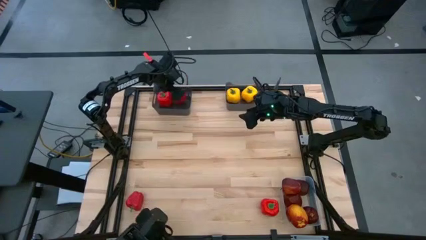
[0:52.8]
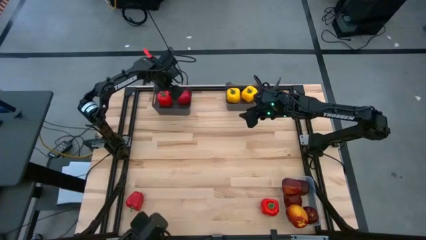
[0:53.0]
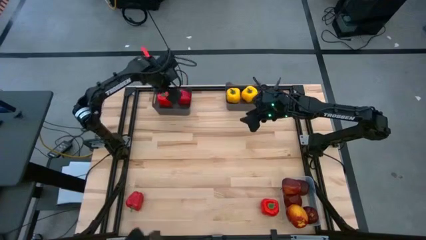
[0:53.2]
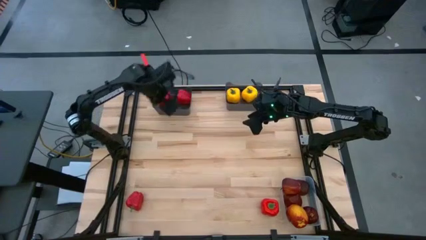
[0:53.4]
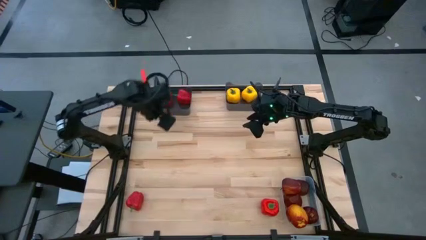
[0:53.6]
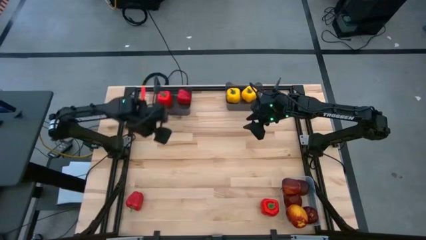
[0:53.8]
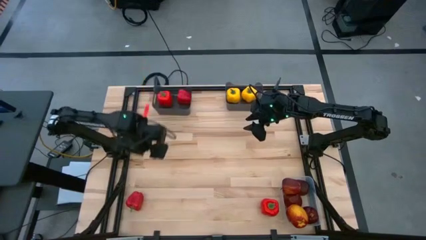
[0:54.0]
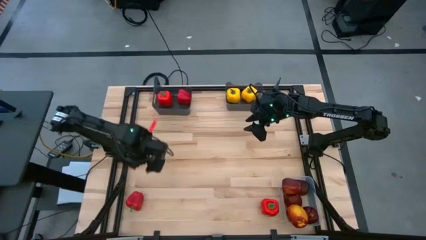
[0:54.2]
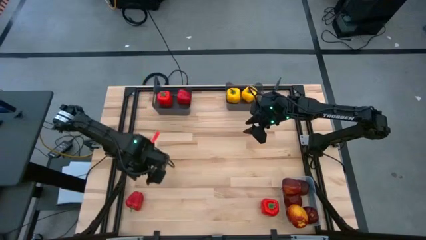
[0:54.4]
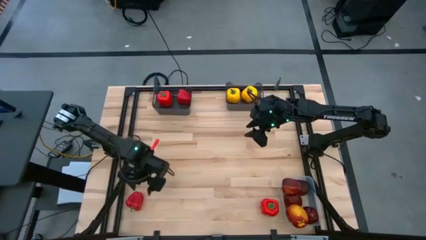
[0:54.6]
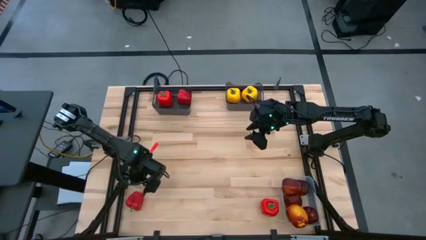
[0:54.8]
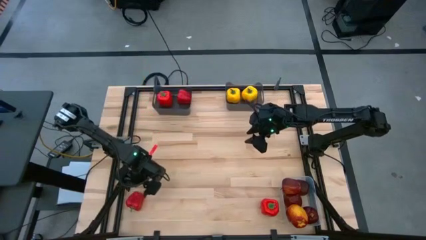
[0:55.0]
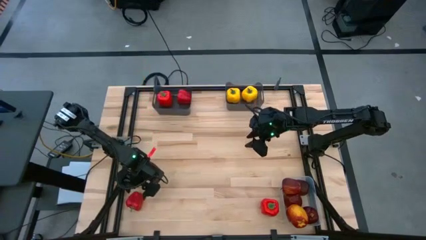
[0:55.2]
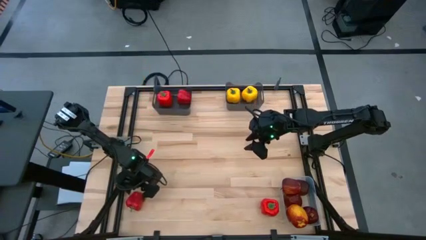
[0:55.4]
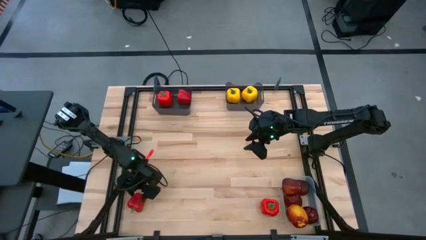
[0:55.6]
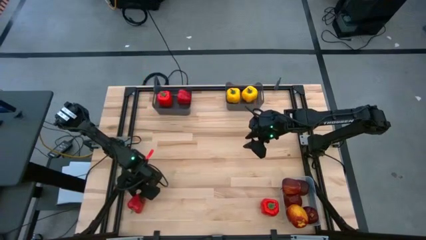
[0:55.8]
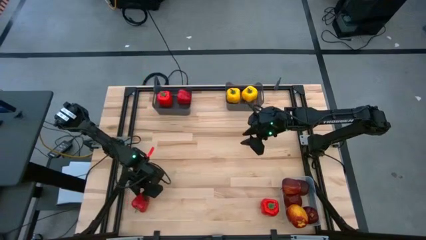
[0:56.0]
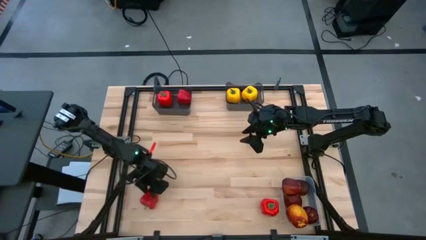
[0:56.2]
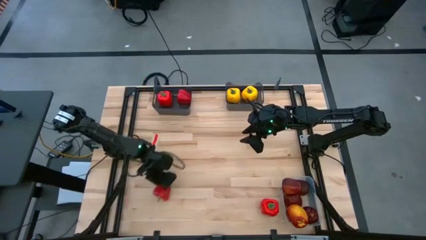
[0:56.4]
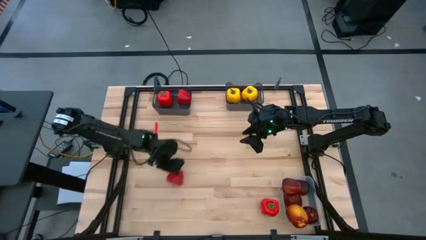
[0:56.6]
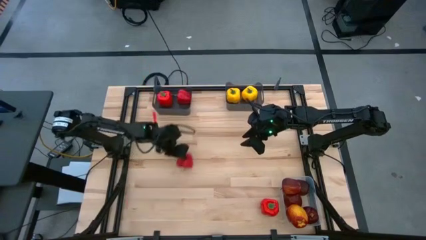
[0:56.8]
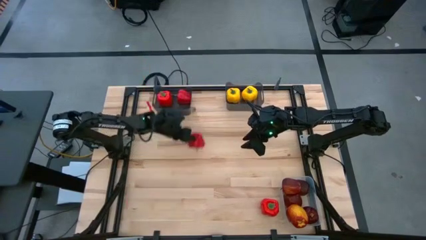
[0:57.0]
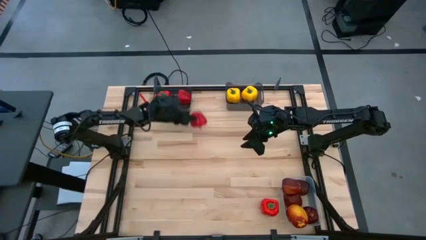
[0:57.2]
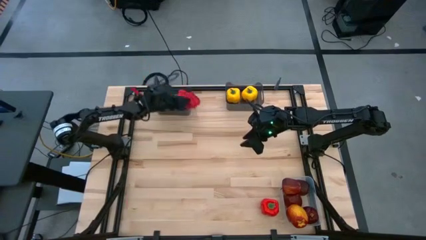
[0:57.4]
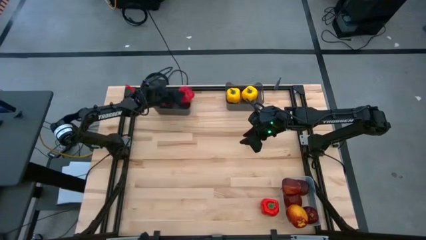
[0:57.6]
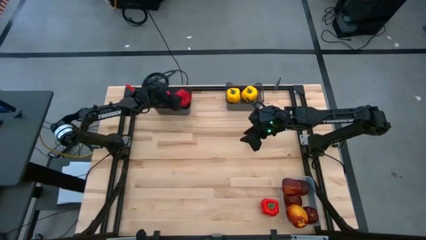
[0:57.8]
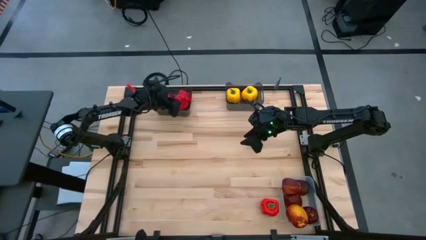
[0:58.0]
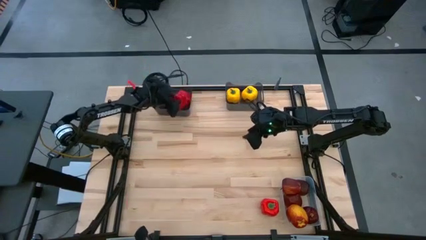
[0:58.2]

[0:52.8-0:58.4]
Task: Sort produce into baskets
Put the red bell pepper into the left black bin

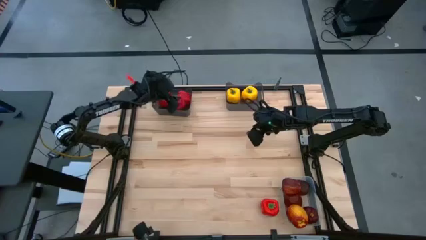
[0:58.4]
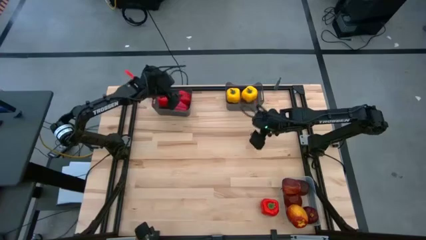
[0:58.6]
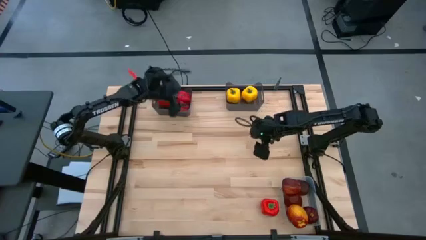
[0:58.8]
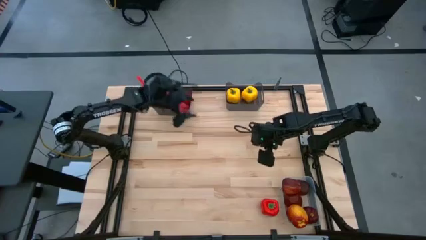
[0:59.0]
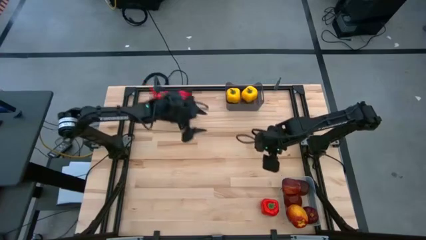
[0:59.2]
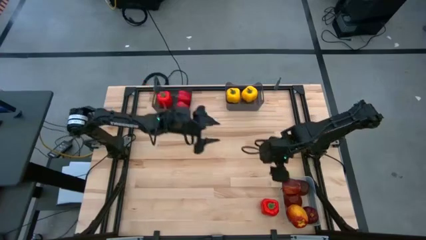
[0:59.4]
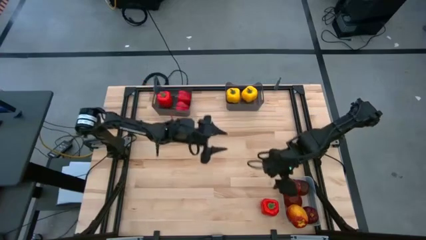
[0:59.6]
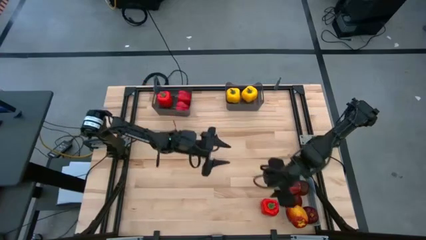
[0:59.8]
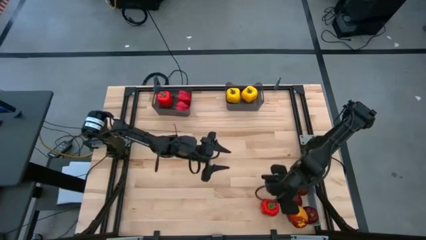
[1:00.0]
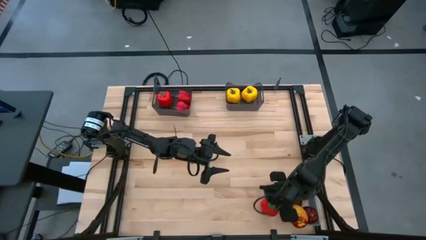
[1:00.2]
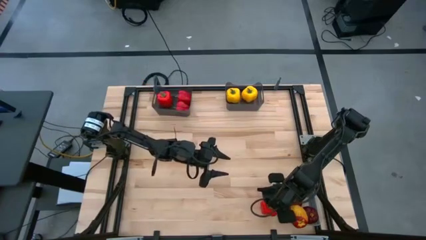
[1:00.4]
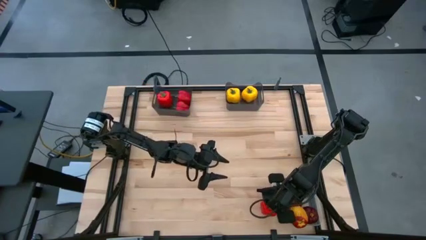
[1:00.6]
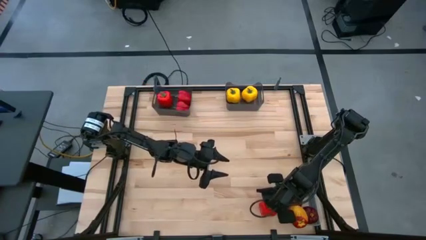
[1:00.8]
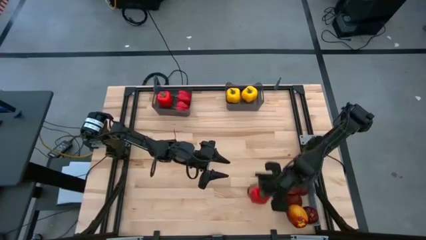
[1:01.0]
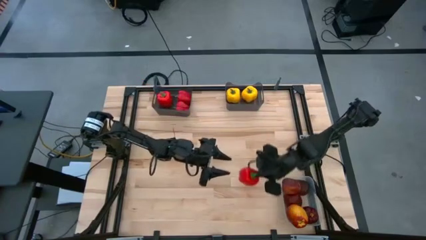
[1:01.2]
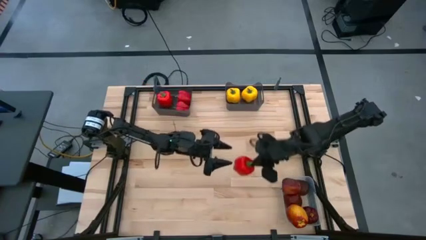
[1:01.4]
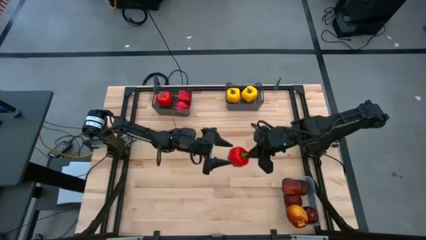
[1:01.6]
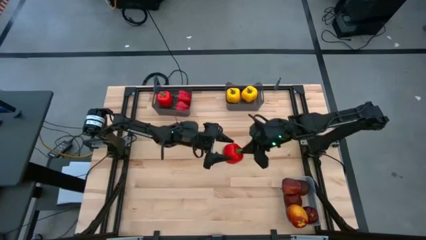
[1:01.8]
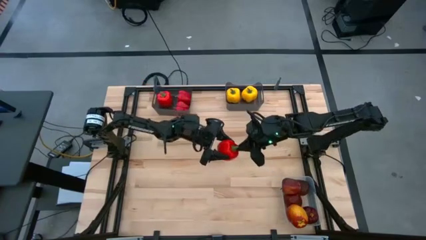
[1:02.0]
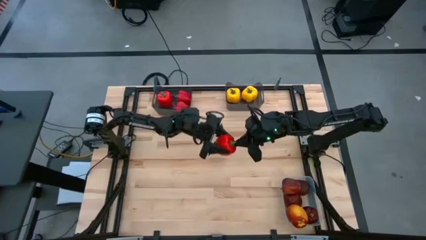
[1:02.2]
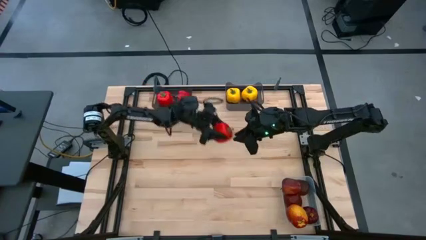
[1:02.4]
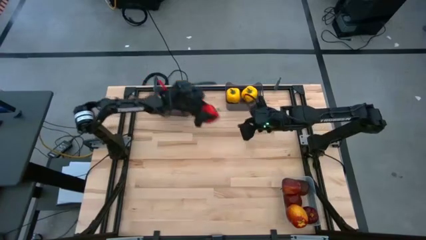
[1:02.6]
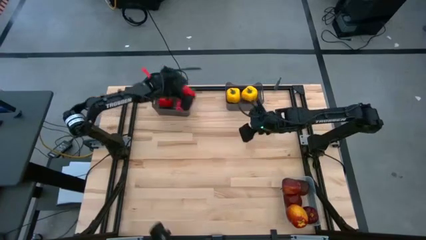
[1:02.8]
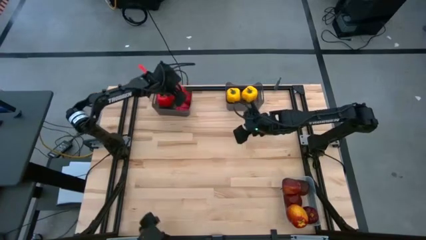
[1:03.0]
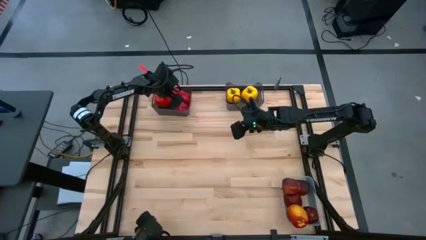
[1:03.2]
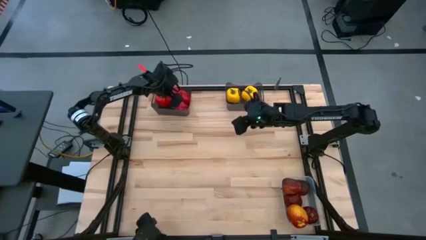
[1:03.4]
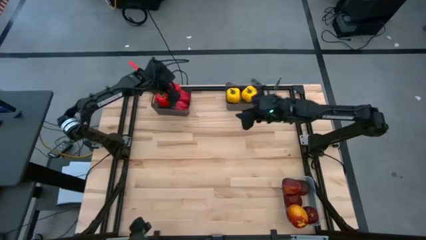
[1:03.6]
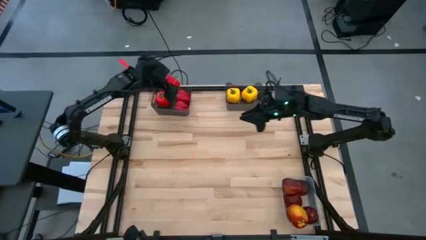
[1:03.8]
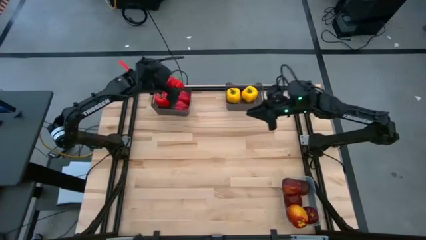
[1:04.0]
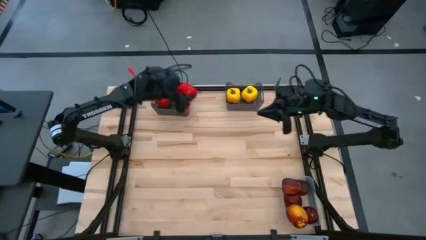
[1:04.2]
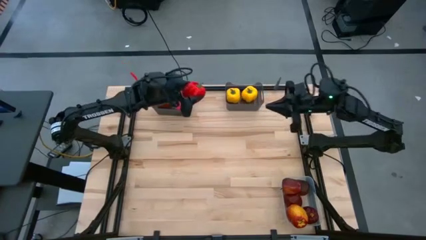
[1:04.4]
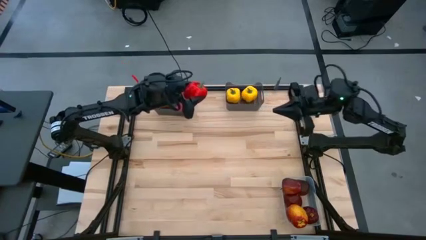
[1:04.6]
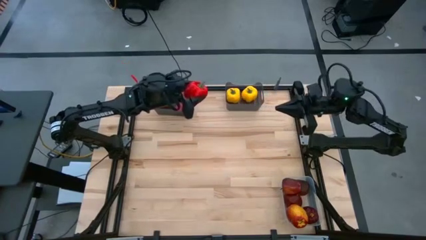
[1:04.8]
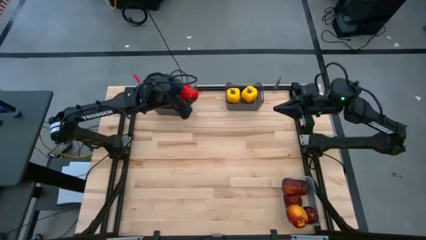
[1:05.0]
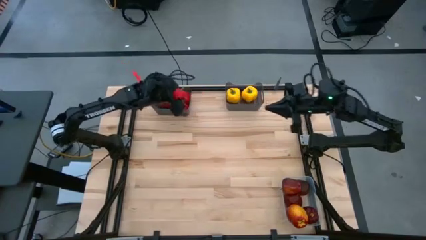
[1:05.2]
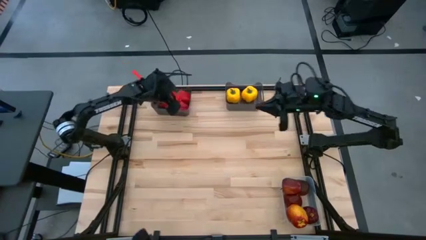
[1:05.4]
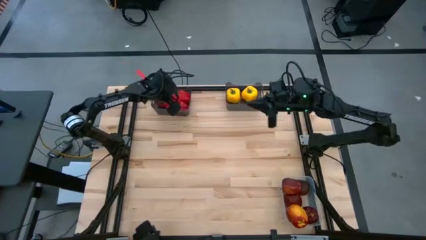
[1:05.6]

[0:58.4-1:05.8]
Put the red bell pepper into the left black bin

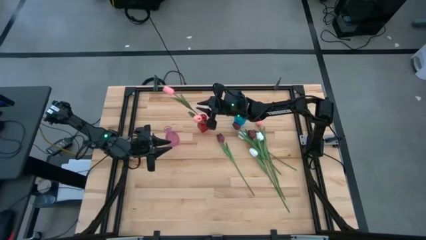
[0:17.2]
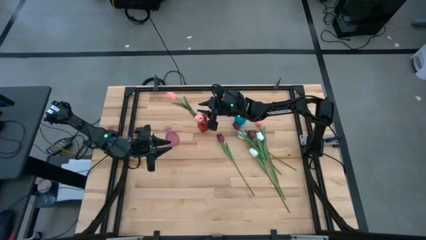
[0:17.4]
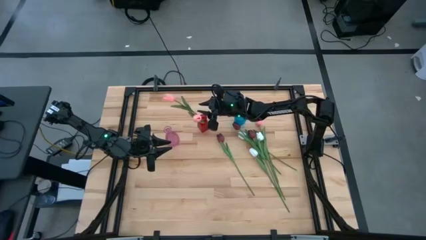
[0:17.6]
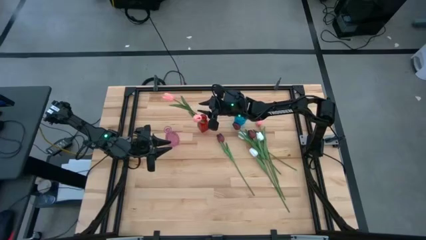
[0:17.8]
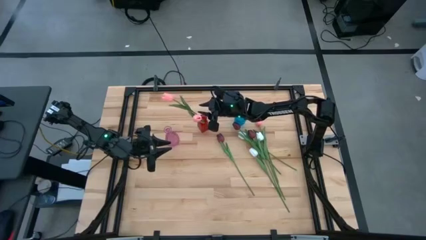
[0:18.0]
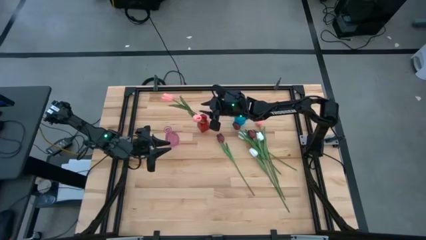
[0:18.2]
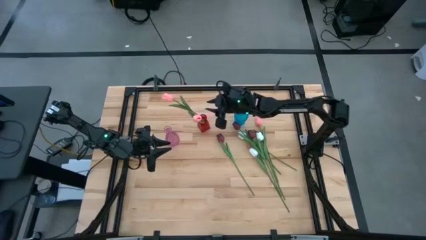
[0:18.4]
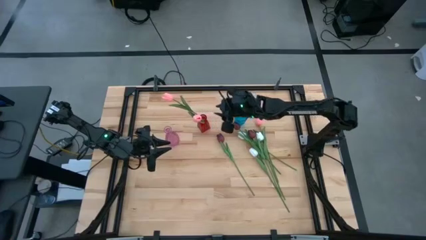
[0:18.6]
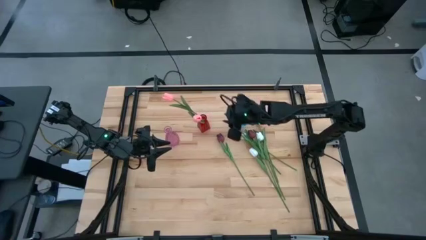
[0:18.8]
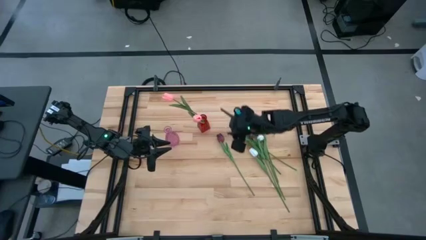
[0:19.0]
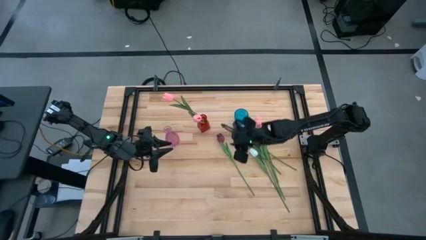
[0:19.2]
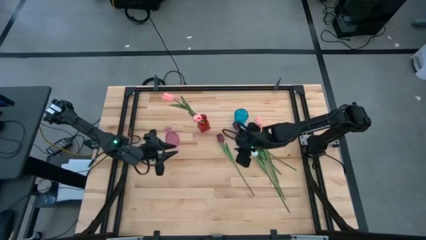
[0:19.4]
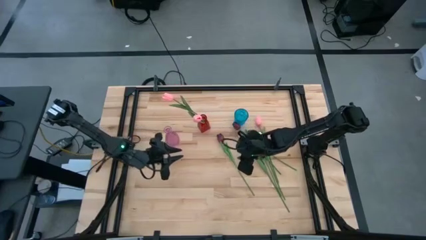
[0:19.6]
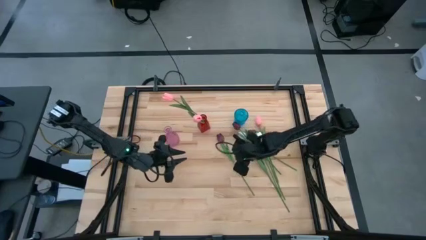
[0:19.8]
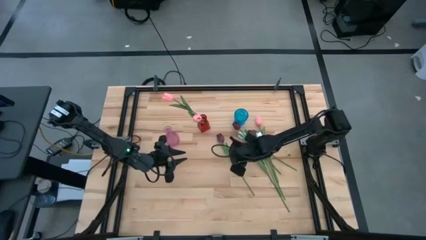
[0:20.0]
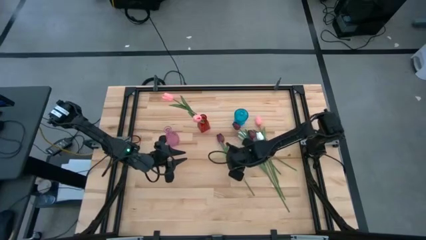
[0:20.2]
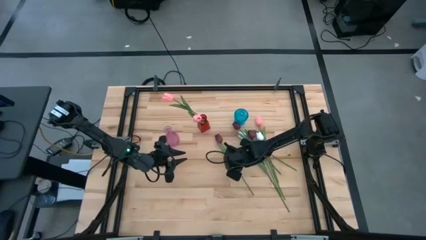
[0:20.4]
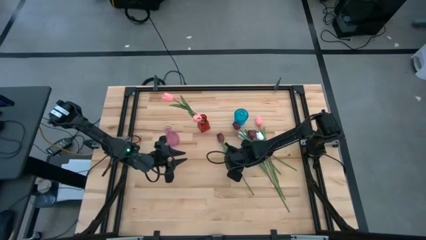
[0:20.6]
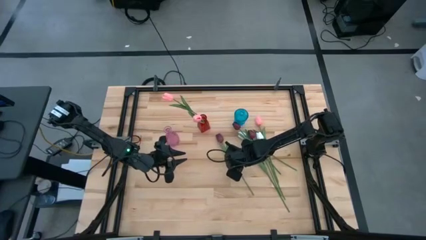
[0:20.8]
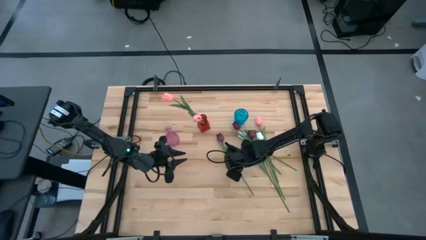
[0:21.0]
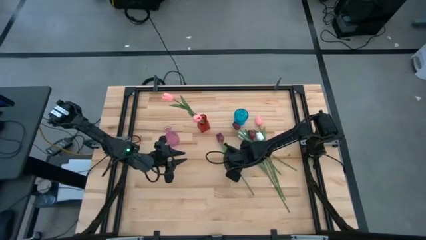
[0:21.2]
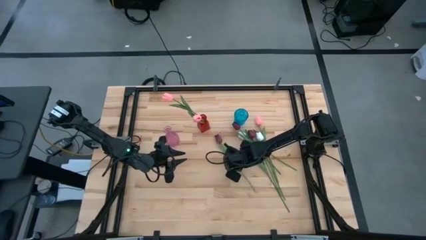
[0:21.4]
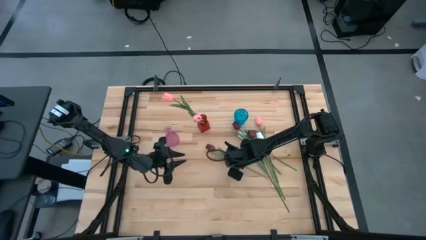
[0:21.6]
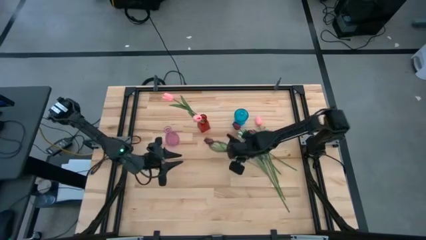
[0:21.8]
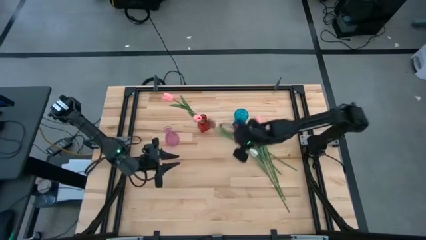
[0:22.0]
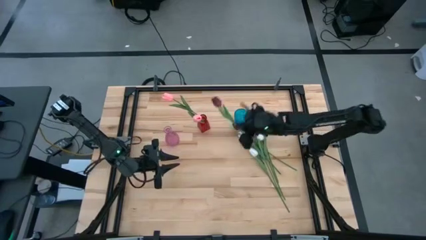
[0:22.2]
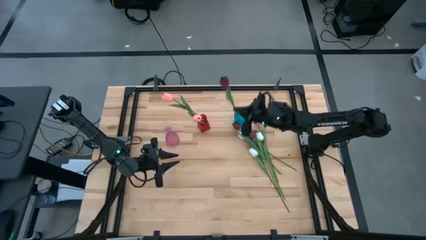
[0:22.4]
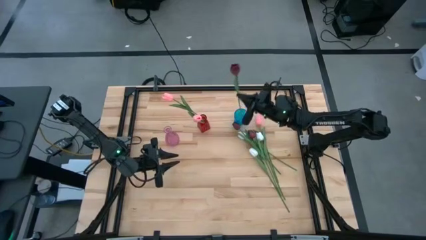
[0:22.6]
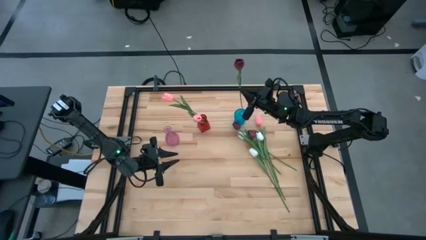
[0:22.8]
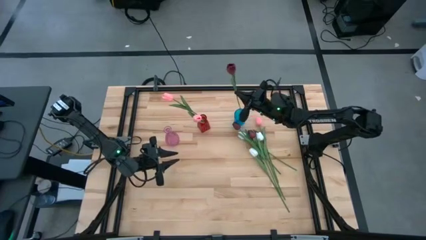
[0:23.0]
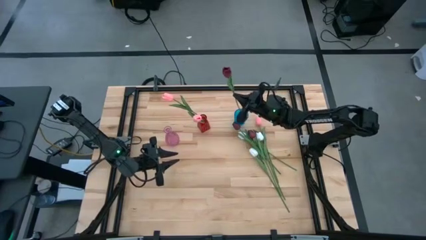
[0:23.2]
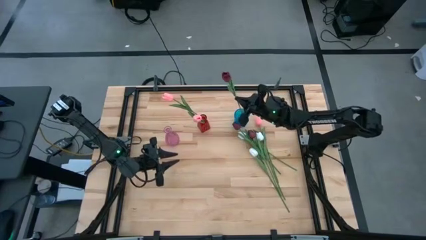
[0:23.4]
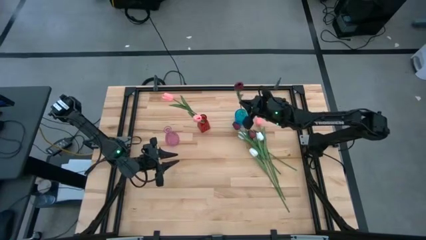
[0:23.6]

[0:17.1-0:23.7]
Task: Sort flowers into vase by color
Put the left red tulip into the blue vase
